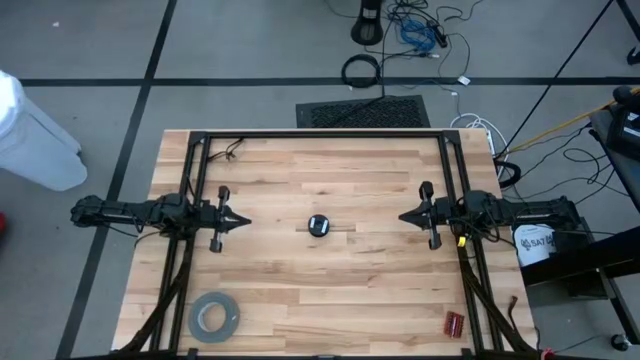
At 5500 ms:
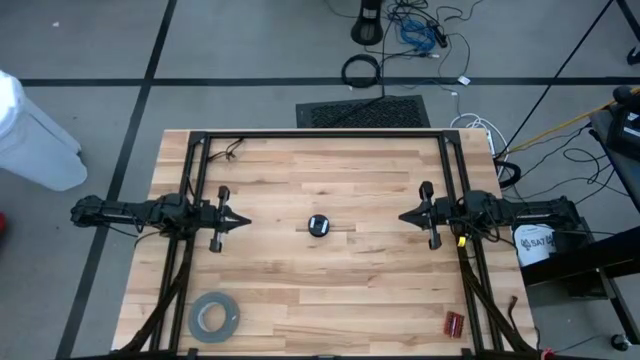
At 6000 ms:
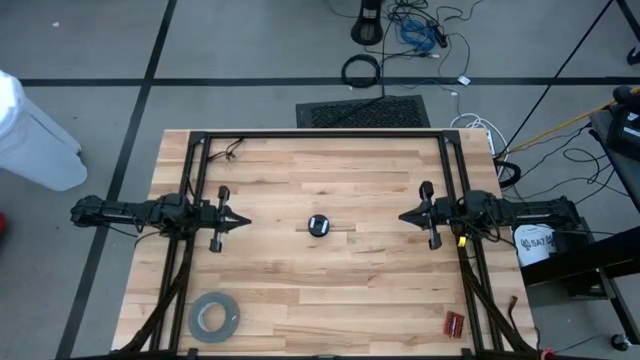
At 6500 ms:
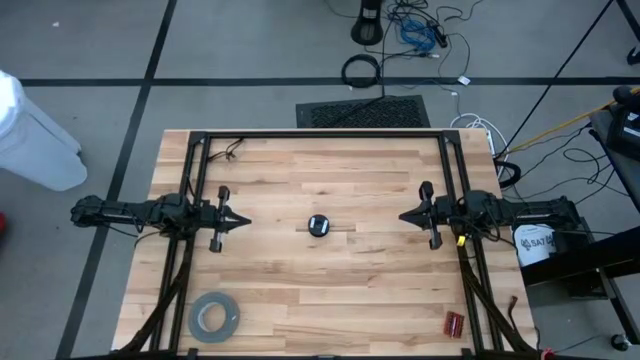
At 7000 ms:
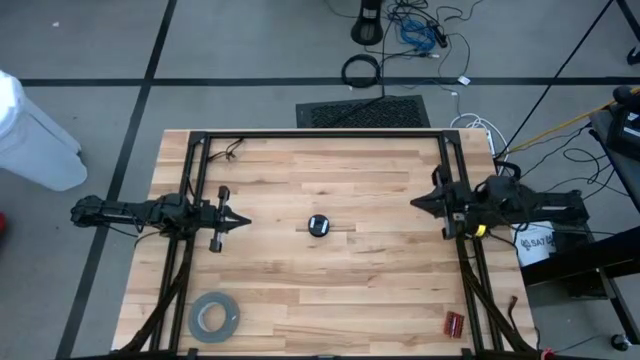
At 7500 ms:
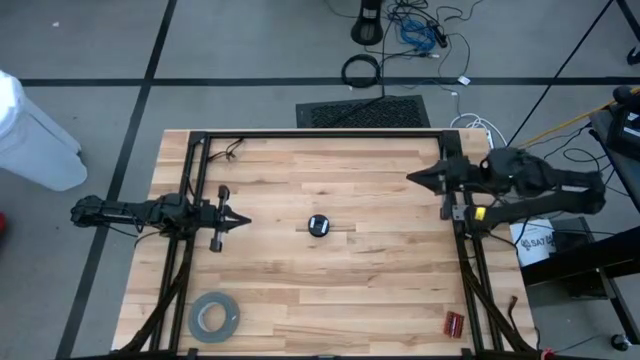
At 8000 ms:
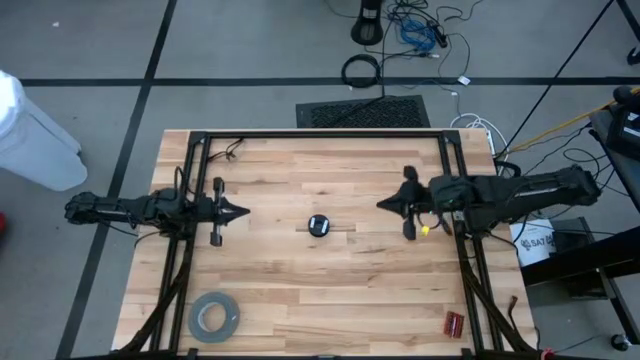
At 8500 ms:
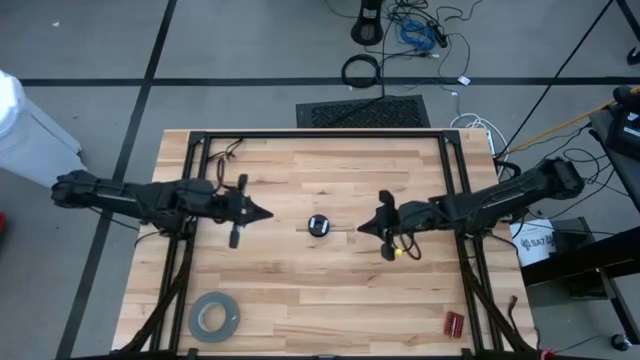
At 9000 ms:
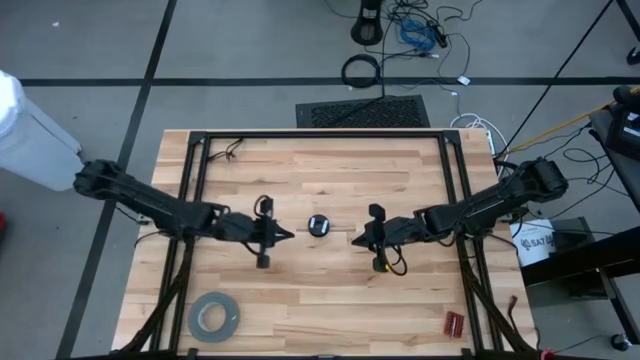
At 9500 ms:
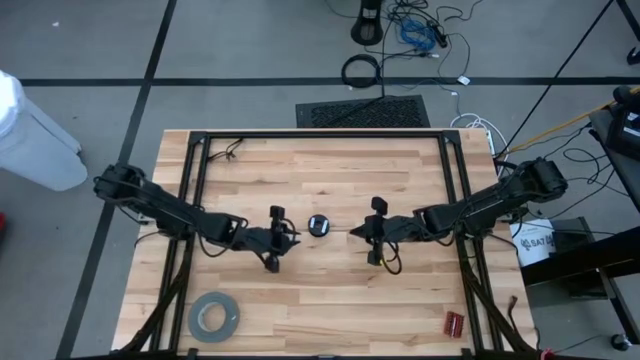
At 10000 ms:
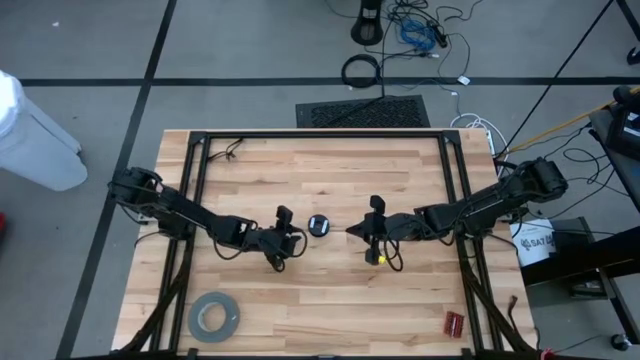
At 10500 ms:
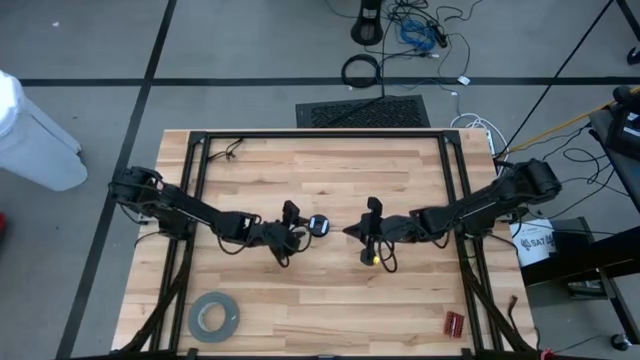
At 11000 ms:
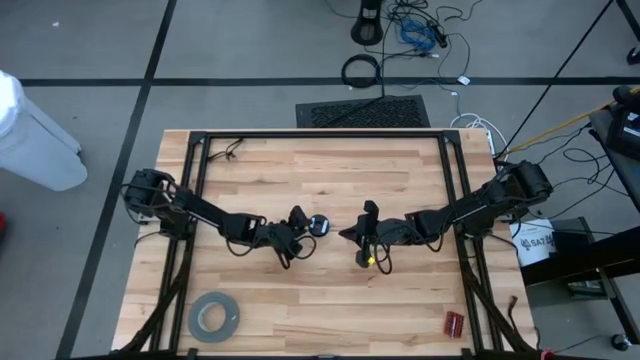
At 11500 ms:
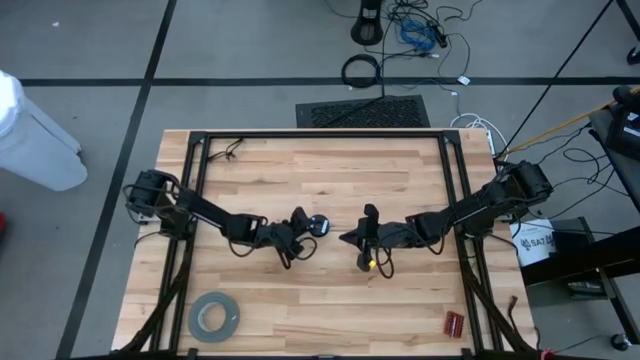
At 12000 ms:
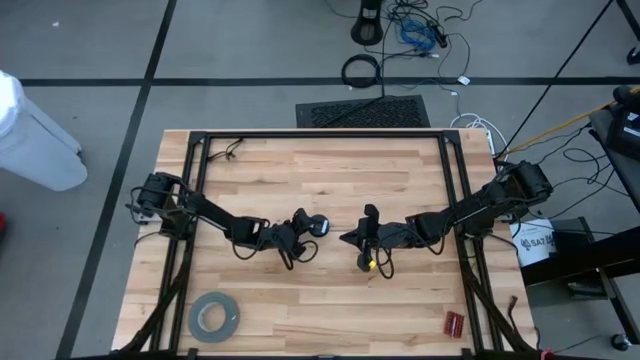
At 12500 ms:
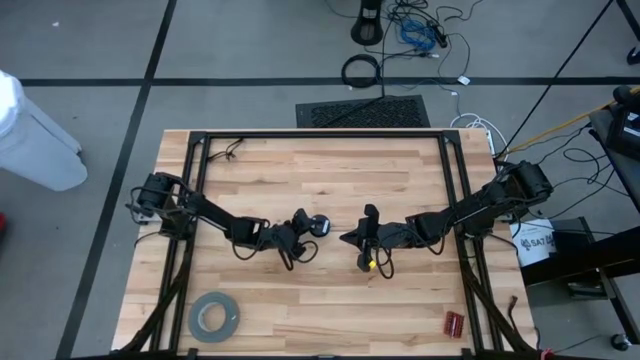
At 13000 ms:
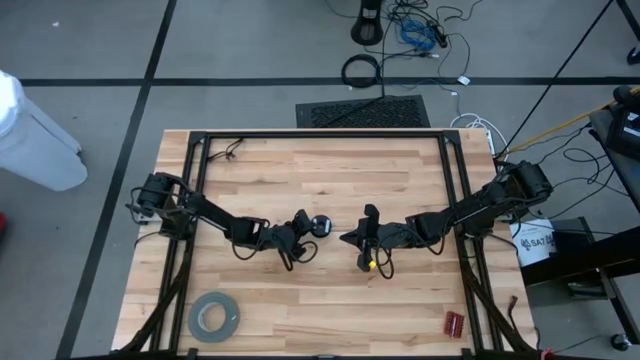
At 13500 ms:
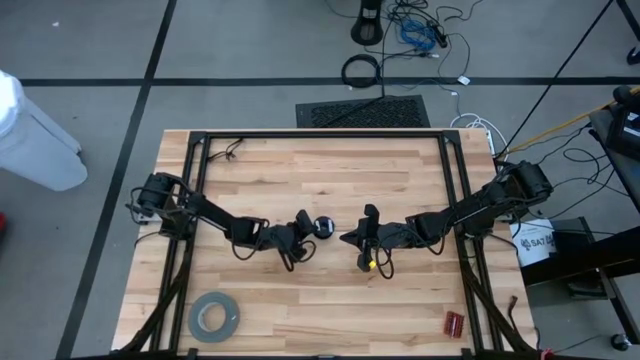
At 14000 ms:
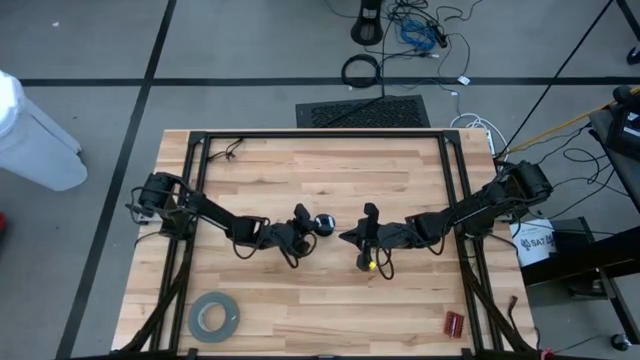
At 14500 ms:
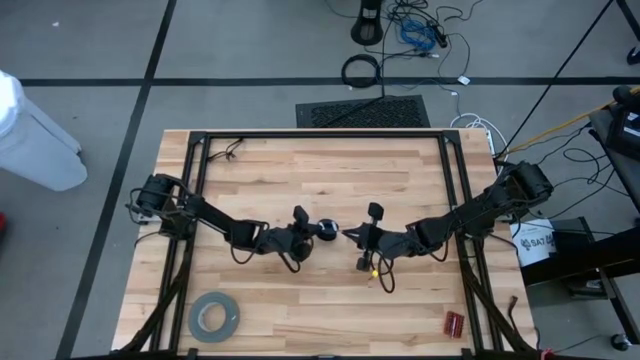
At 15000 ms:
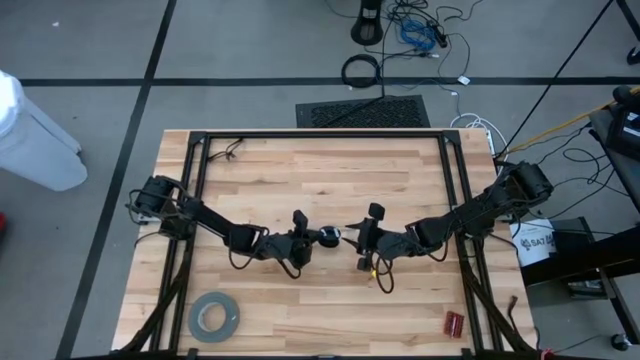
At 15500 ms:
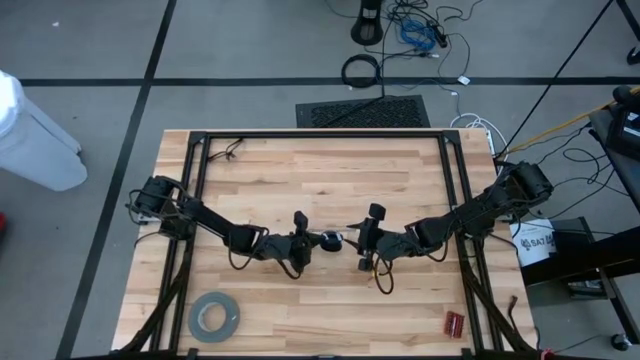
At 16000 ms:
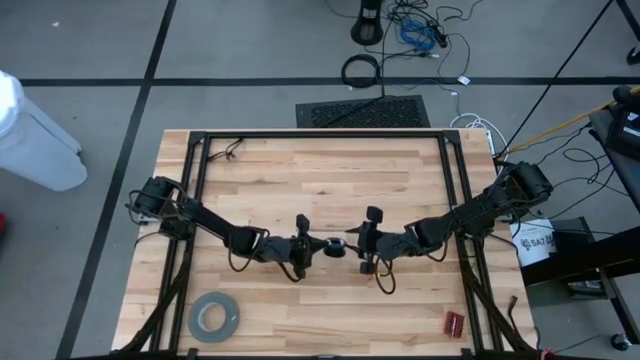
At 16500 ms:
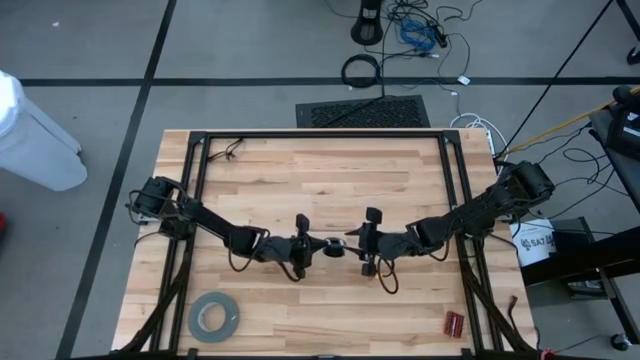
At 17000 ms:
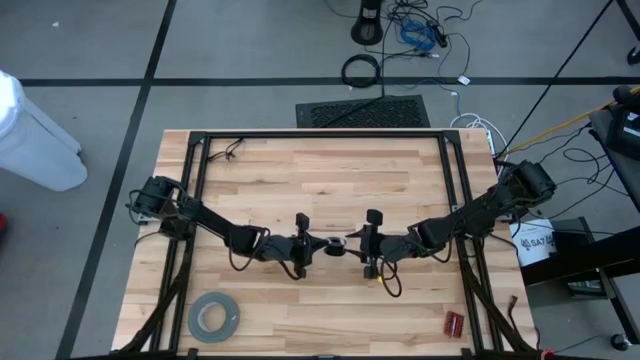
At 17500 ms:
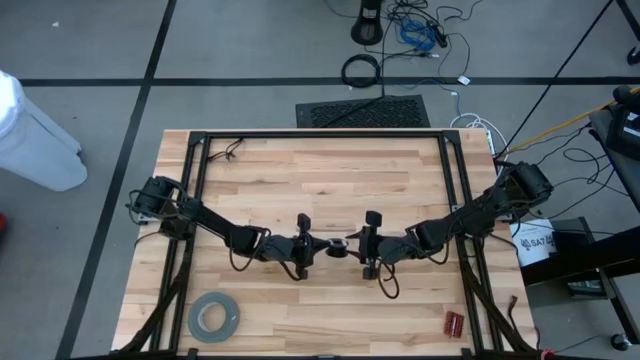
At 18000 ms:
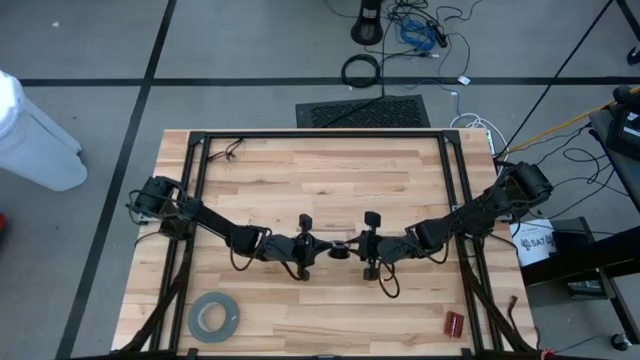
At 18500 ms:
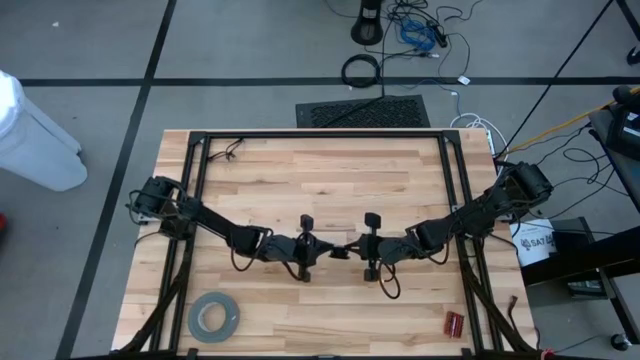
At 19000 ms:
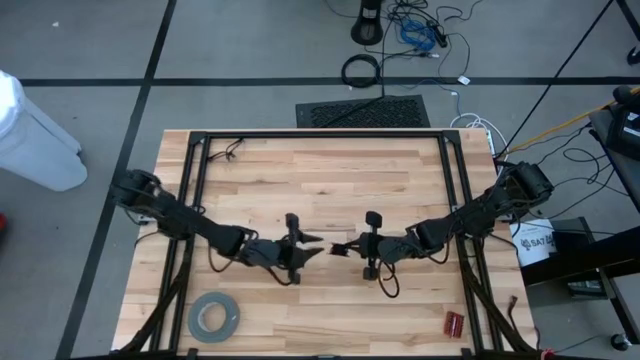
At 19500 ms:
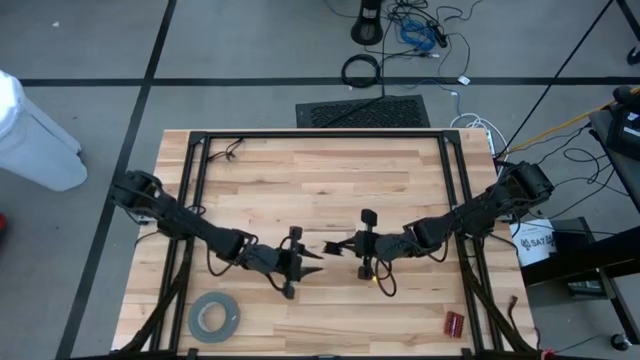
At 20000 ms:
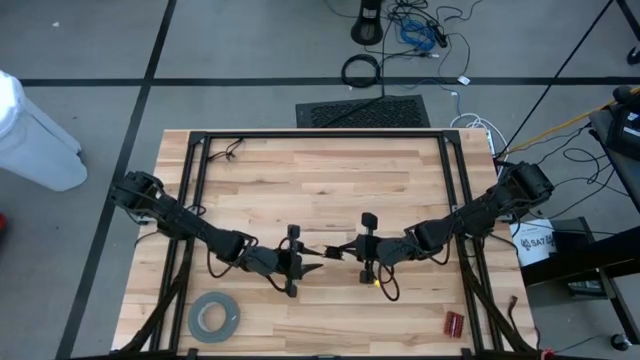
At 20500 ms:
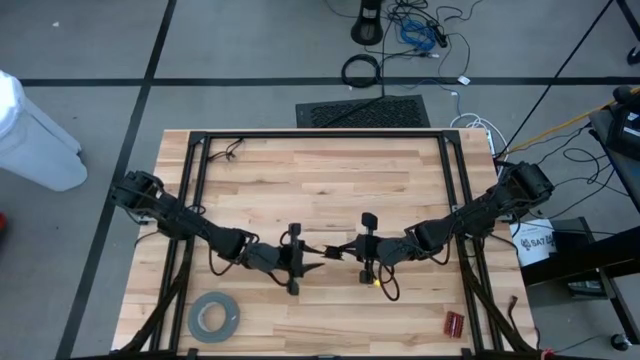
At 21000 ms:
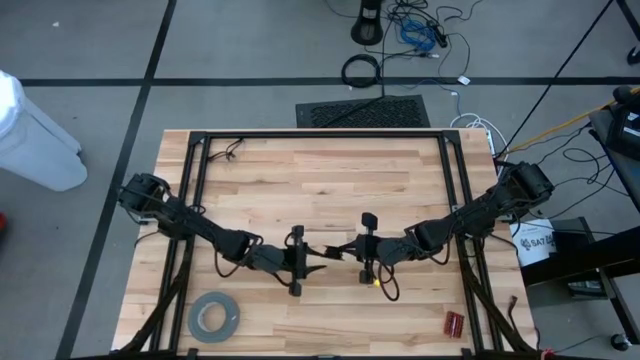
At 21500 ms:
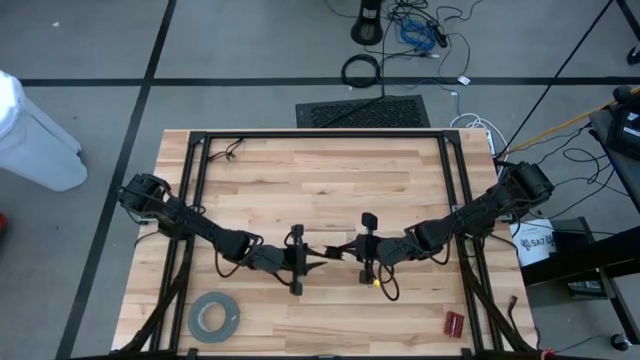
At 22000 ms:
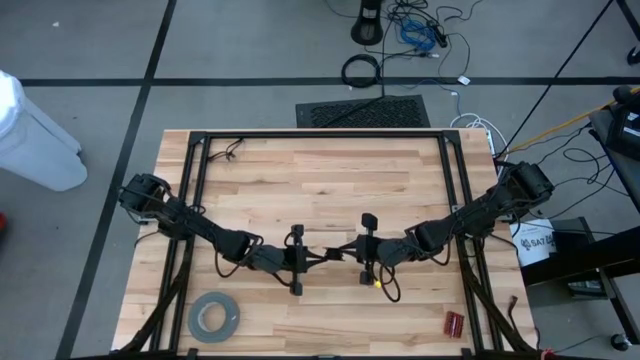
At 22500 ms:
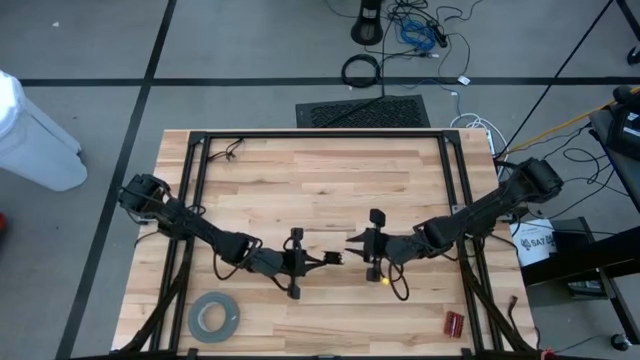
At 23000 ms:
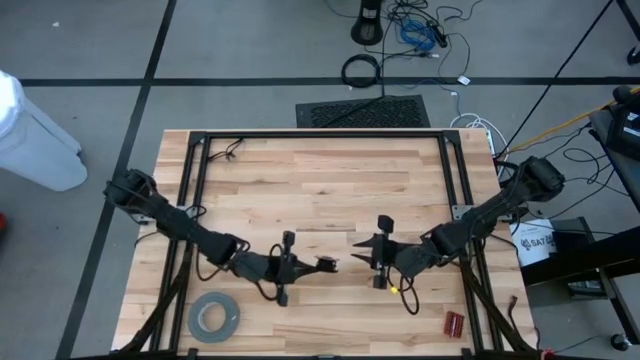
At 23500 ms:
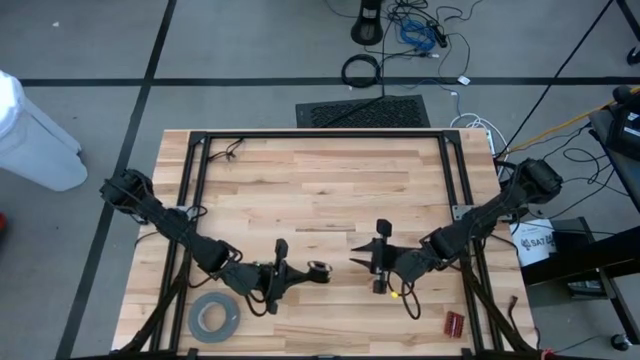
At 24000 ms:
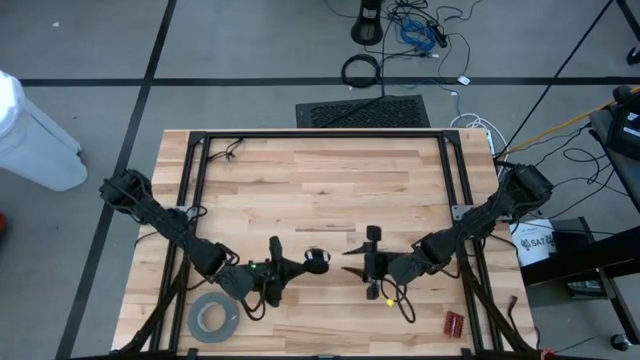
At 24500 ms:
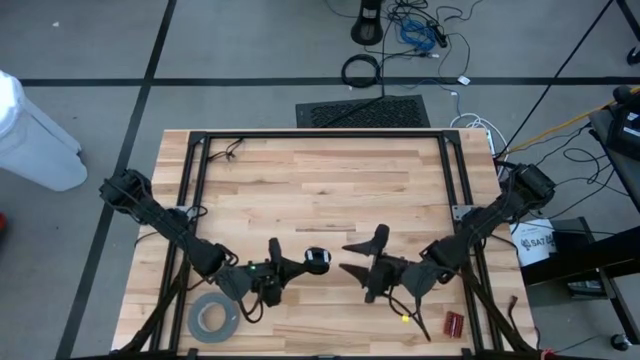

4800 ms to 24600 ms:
Task: Coil cords
Uncoil the black wire from the spool
